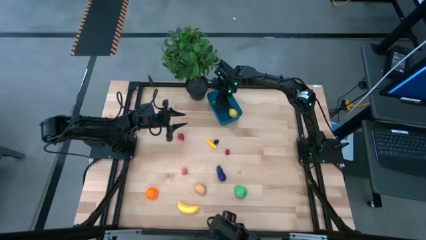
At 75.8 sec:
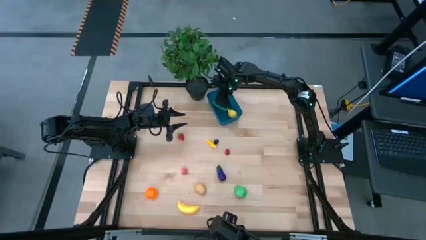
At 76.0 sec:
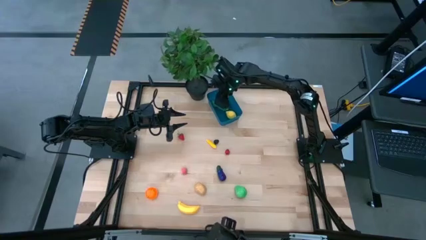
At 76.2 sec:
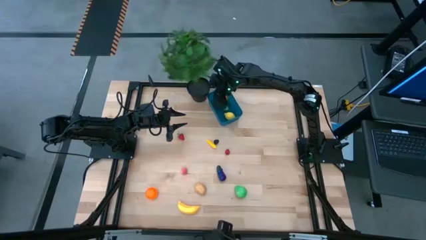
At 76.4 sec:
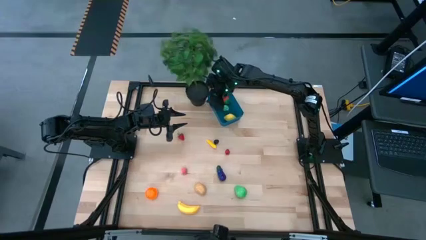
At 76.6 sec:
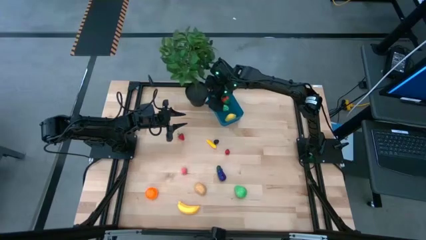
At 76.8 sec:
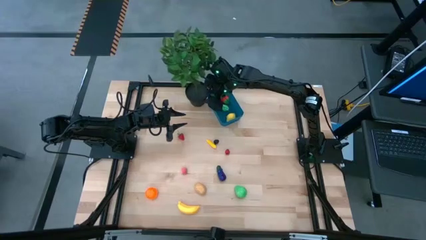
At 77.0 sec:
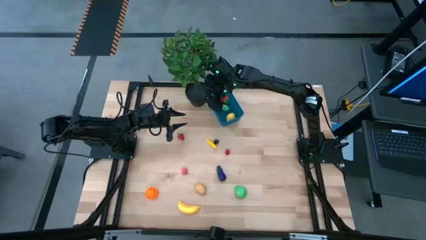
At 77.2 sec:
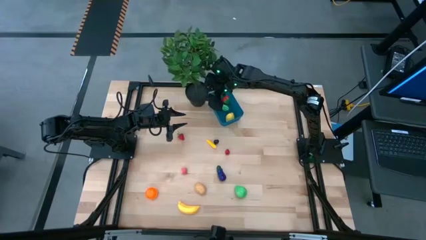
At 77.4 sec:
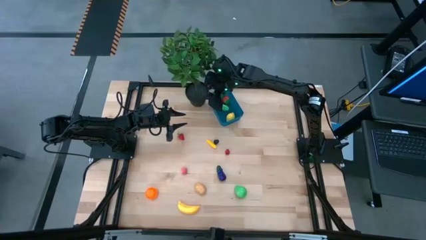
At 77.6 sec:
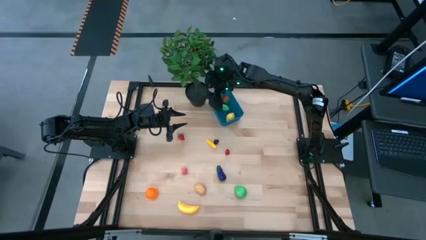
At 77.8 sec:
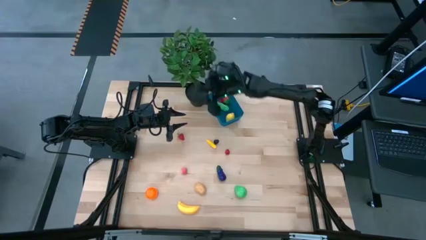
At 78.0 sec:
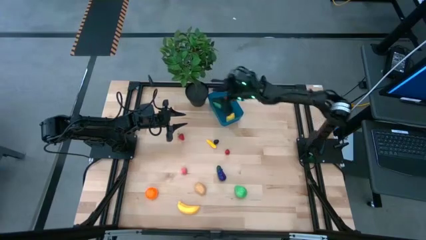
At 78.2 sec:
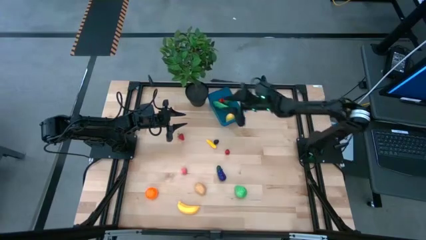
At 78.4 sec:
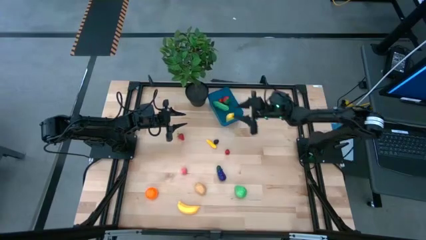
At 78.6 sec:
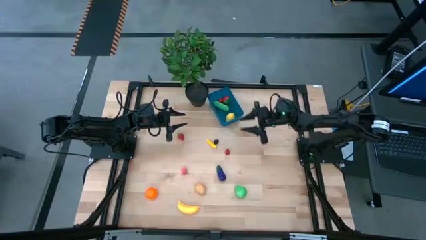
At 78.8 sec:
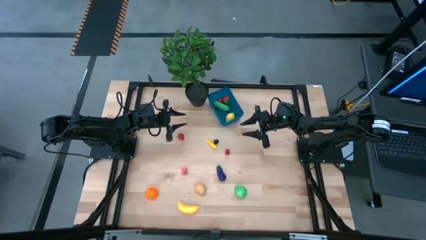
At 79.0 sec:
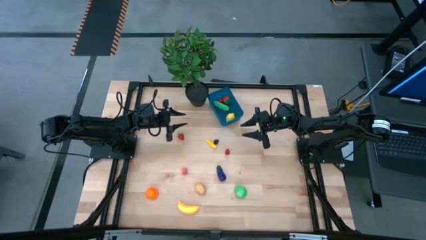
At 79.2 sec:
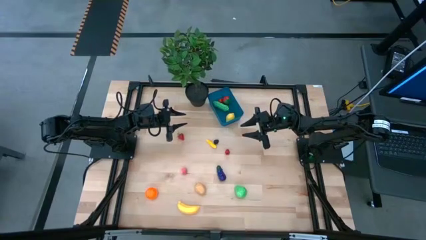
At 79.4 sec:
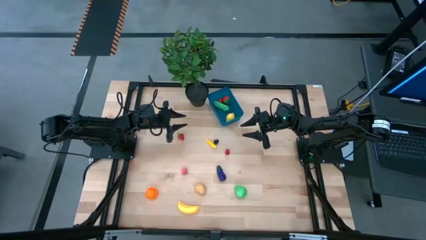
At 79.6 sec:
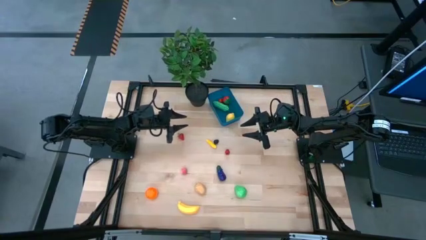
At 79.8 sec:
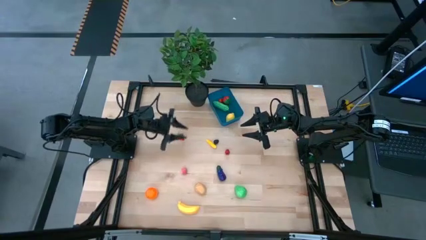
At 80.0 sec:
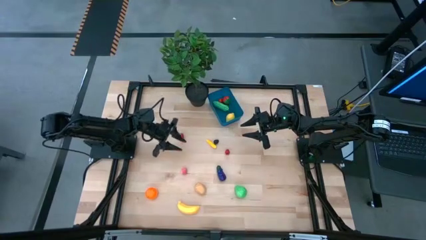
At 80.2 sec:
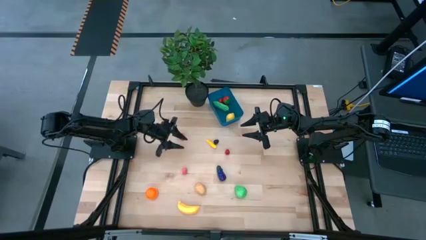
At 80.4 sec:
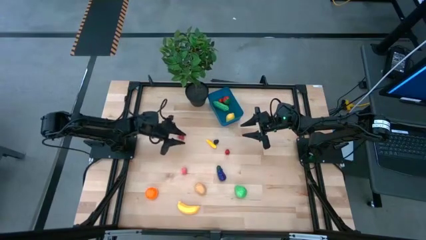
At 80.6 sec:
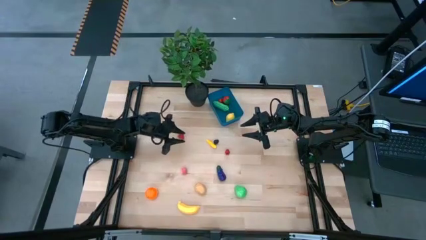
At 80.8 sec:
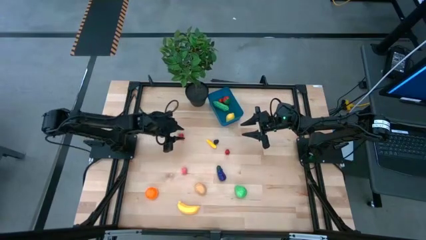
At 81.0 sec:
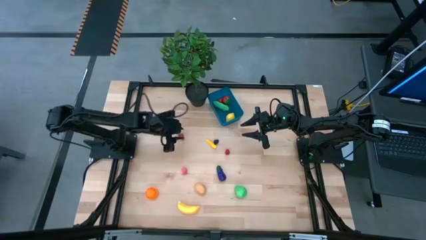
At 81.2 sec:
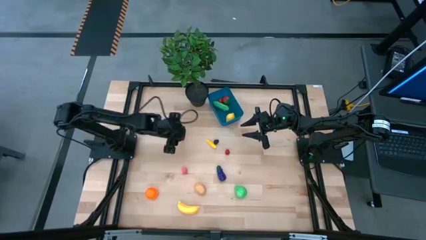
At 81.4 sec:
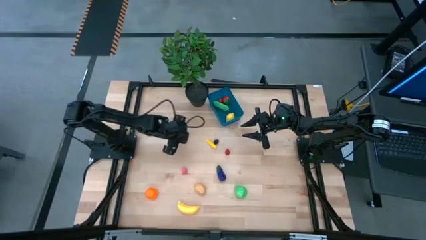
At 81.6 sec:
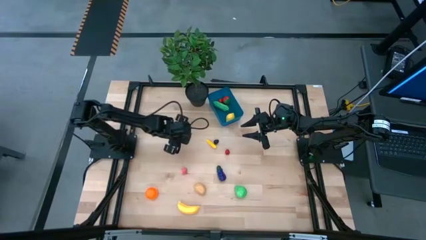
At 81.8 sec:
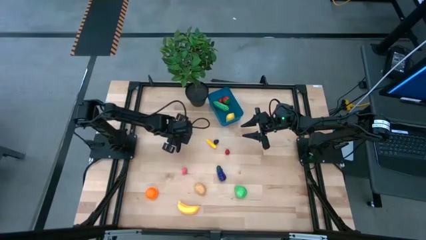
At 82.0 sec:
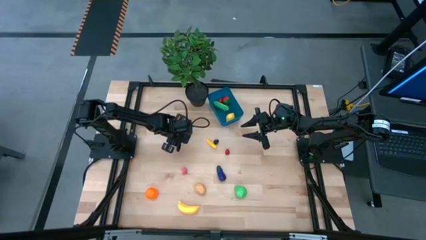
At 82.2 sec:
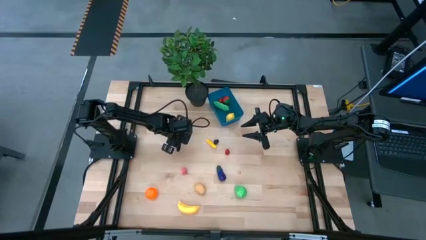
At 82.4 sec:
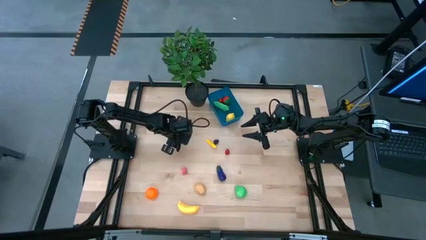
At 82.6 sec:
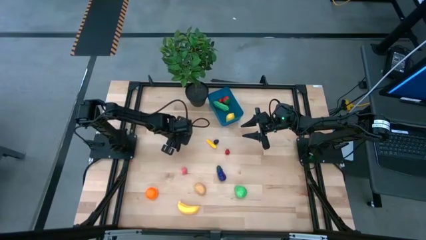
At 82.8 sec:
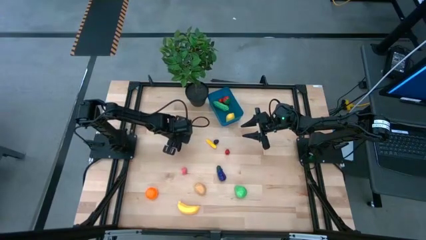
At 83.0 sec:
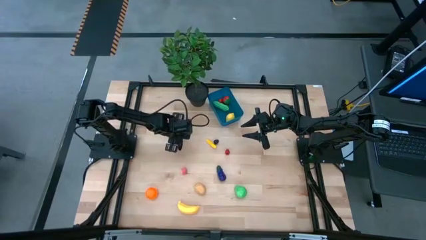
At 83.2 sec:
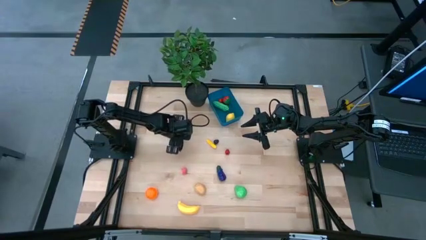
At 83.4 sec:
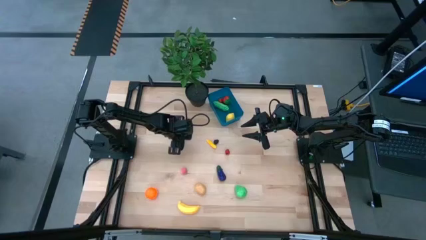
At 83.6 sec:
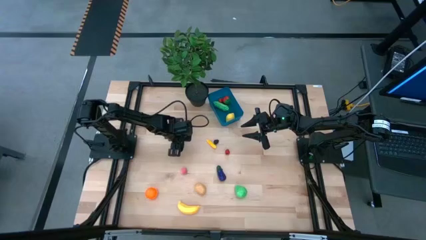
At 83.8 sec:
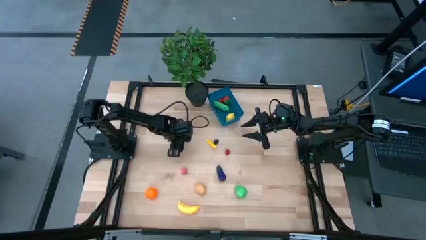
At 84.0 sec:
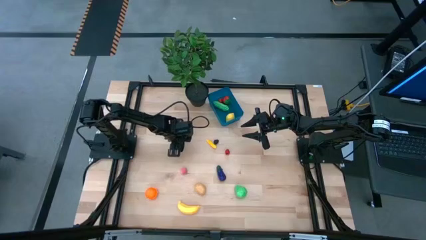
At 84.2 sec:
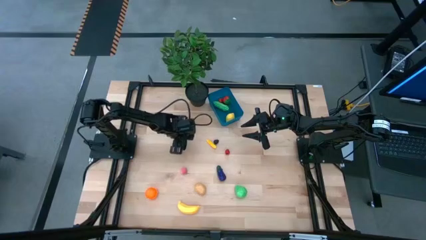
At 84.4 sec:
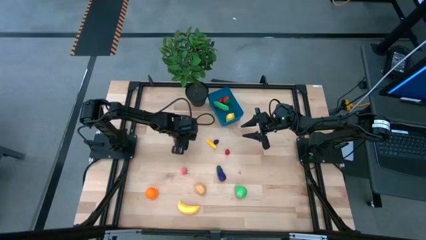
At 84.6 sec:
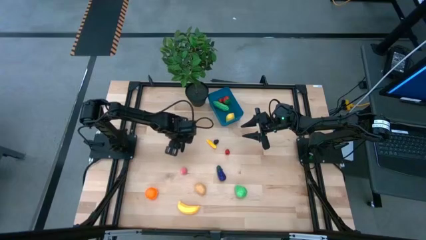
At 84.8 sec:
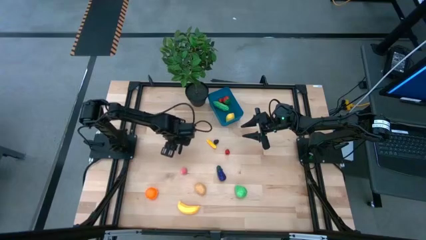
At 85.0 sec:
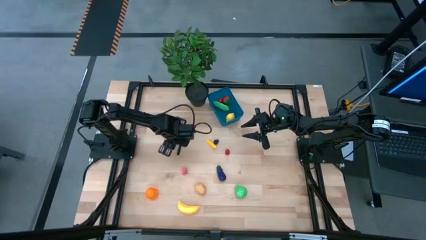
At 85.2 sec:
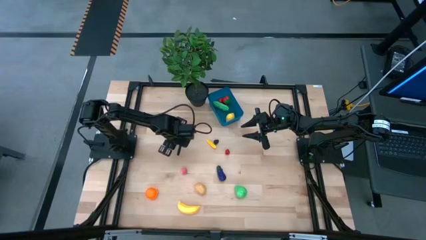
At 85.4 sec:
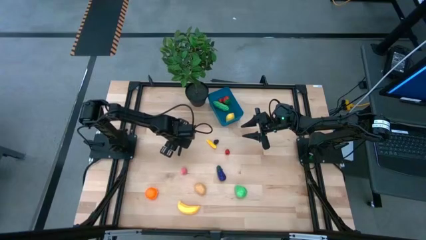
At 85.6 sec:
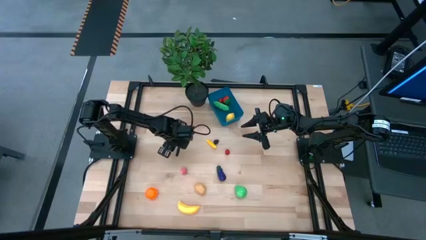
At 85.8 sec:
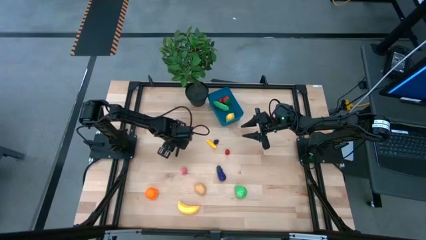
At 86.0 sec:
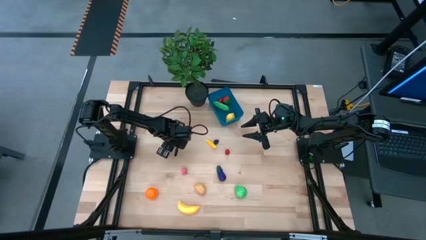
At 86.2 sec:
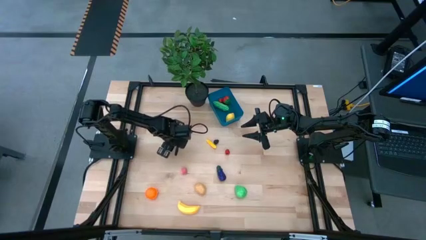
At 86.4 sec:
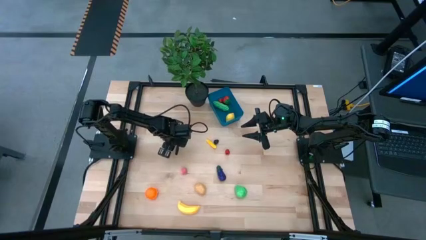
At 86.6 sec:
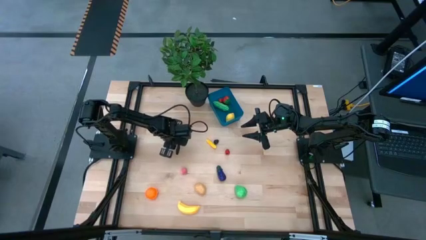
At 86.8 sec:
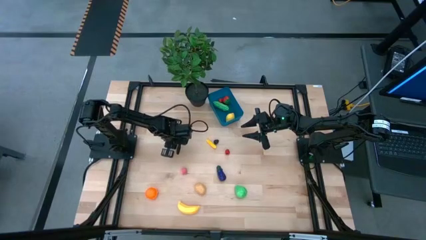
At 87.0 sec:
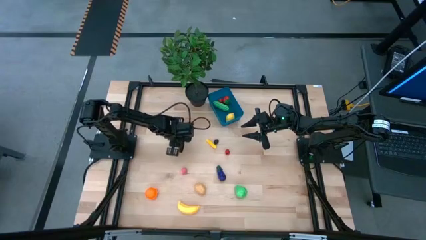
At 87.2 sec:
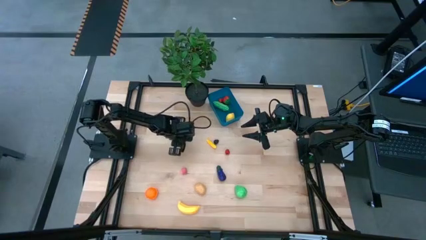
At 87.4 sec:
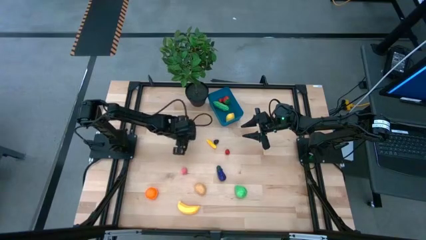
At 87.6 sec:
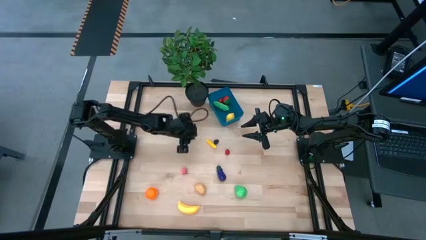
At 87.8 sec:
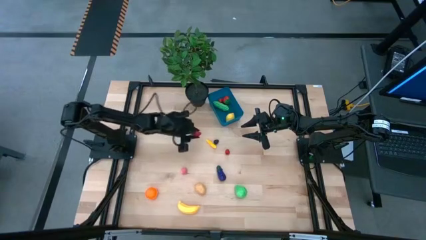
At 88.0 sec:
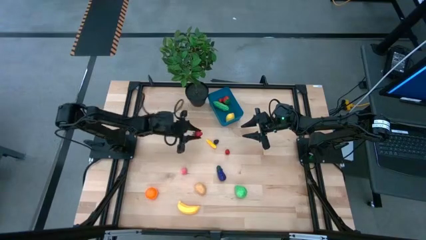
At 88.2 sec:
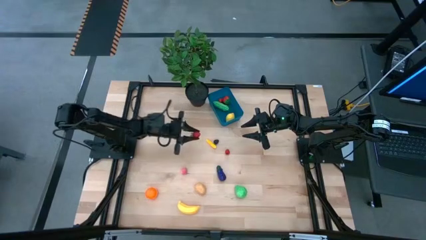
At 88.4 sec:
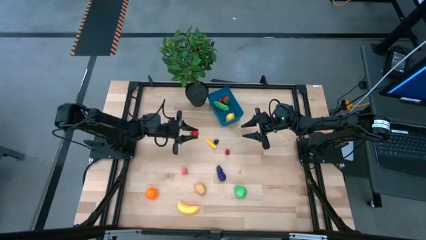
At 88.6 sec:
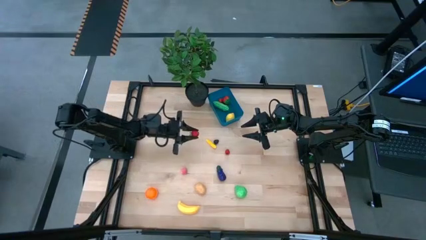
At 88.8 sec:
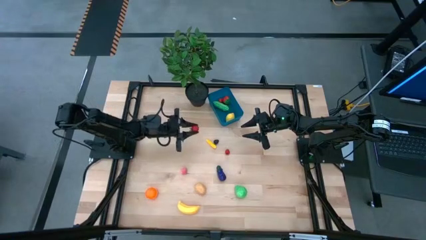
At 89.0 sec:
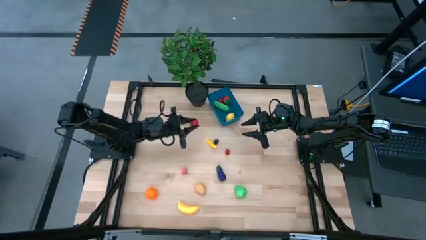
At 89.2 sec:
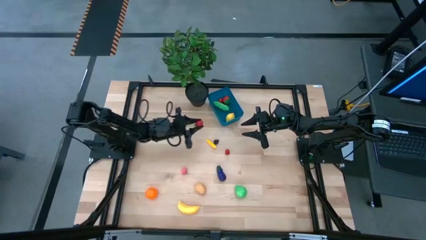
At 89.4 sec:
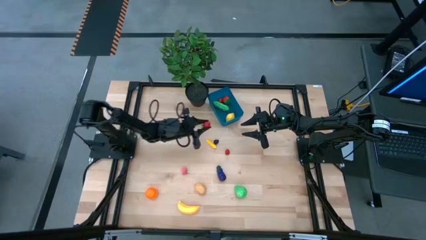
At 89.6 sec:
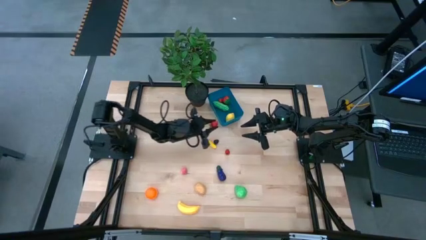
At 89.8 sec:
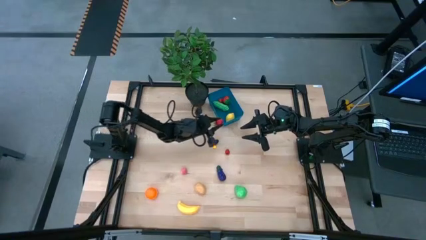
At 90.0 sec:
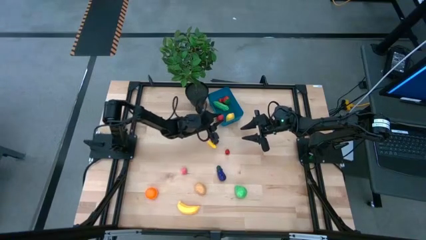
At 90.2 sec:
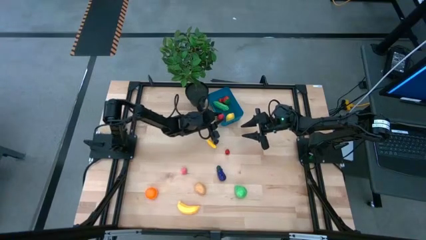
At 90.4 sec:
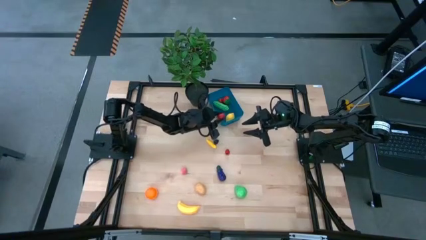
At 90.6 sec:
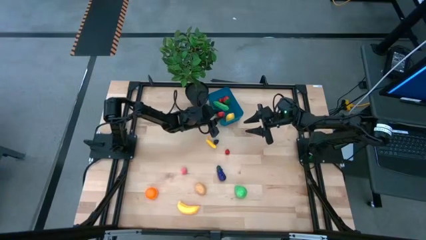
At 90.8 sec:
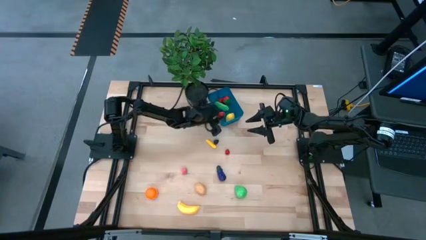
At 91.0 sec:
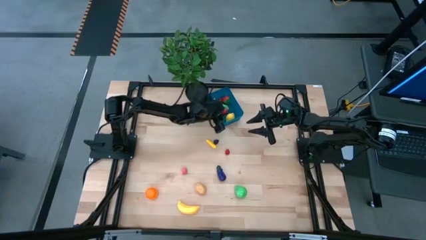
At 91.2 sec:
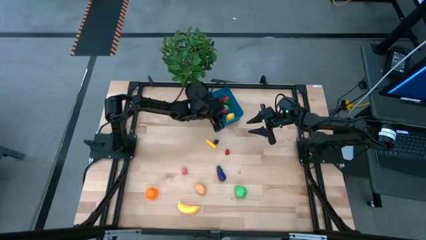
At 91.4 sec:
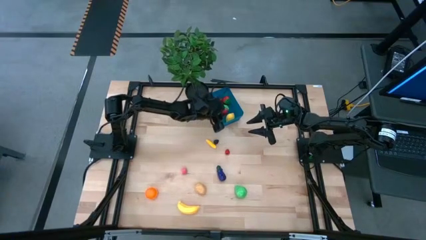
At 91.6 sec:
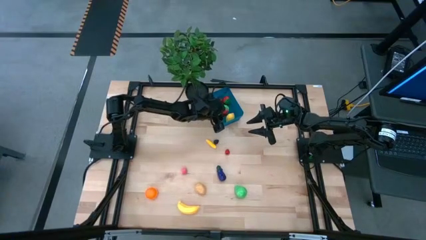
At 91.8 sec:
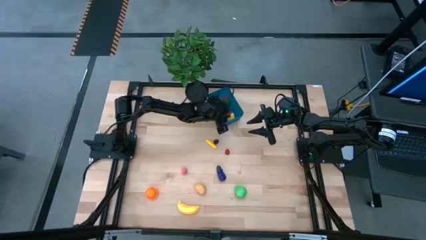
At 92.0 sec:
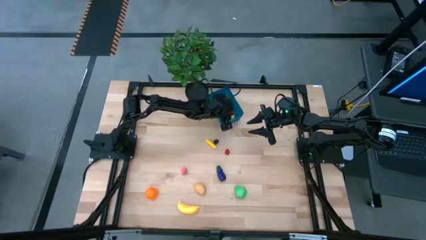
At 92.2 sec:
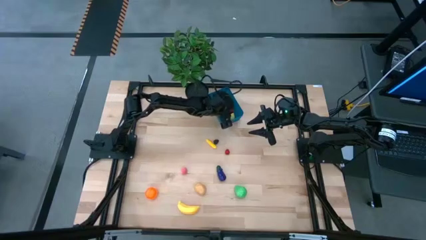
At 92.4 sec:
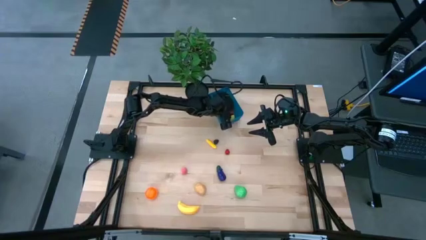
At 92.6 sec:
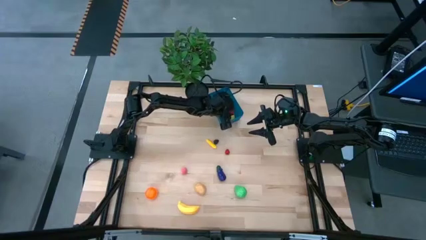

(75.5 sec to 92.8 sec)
Task: Pick and placing Produce into tupperware
Put the strawberry into the blue bin
